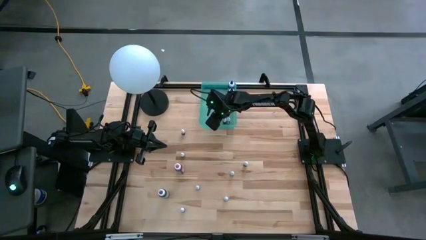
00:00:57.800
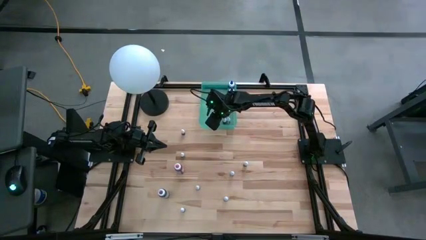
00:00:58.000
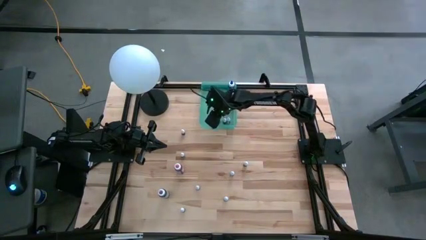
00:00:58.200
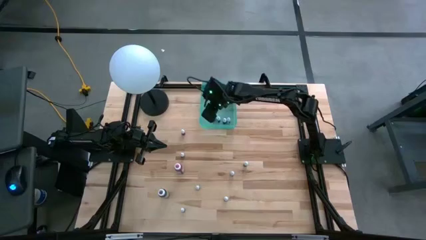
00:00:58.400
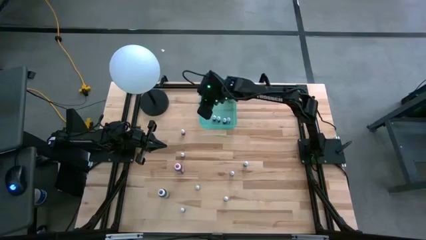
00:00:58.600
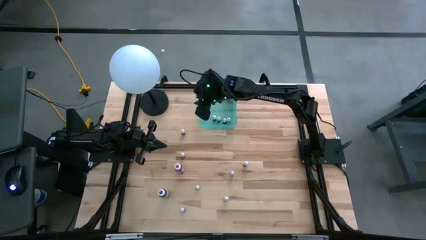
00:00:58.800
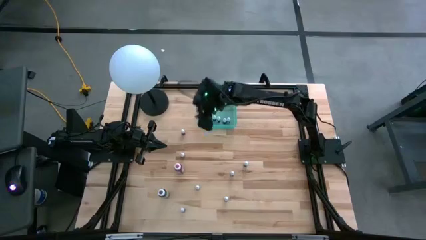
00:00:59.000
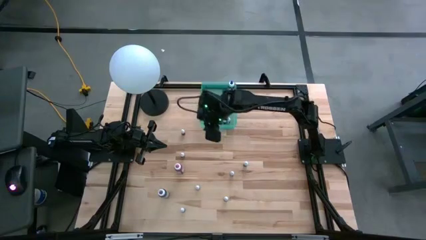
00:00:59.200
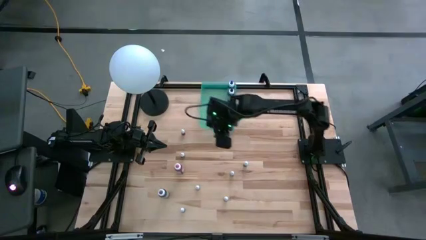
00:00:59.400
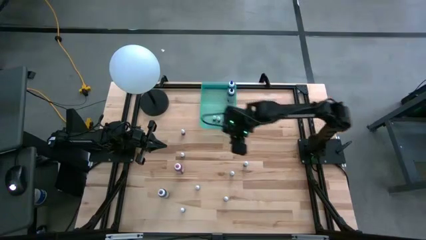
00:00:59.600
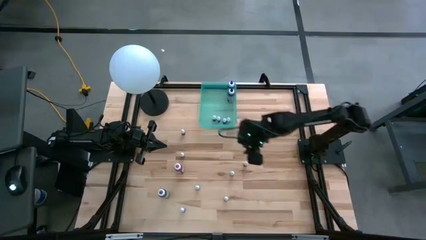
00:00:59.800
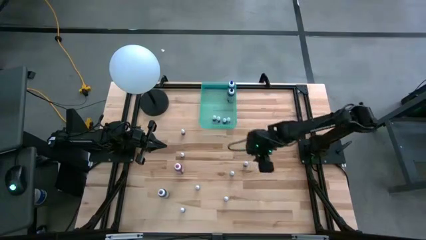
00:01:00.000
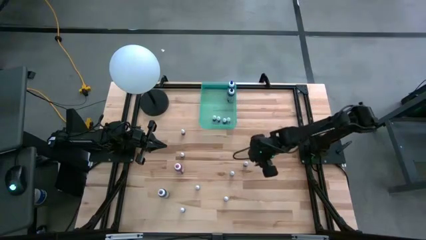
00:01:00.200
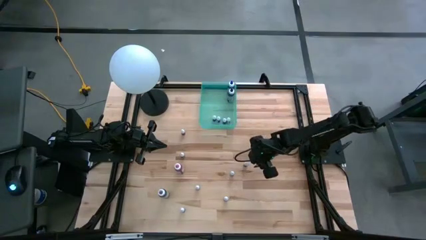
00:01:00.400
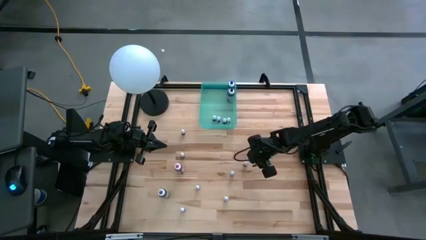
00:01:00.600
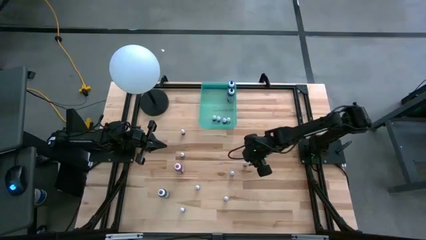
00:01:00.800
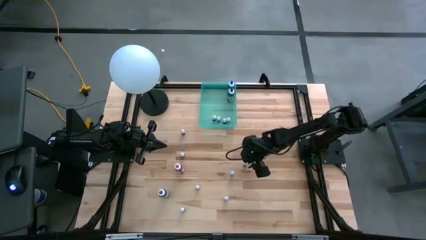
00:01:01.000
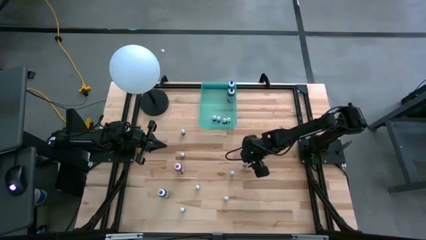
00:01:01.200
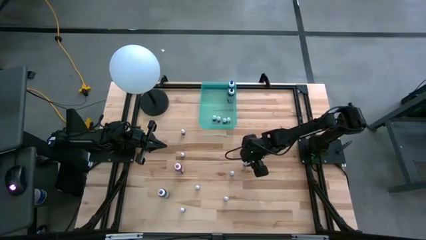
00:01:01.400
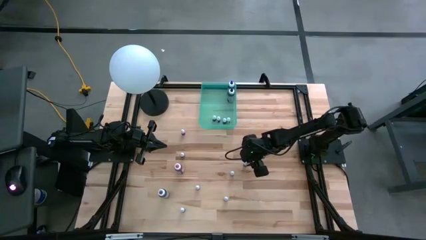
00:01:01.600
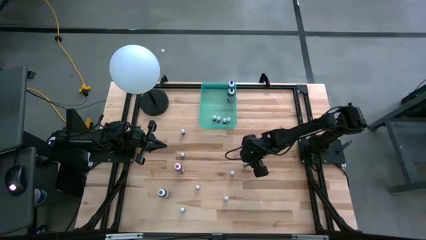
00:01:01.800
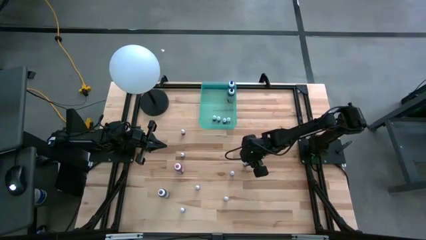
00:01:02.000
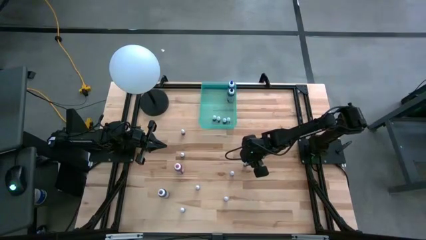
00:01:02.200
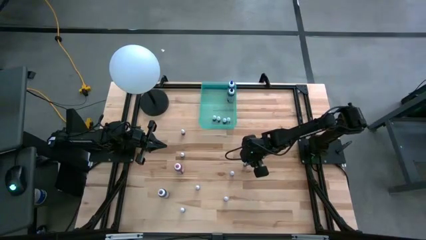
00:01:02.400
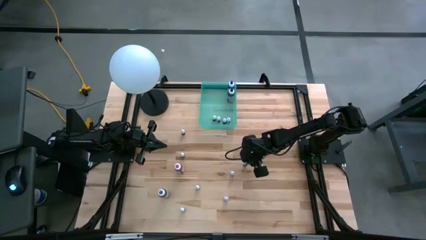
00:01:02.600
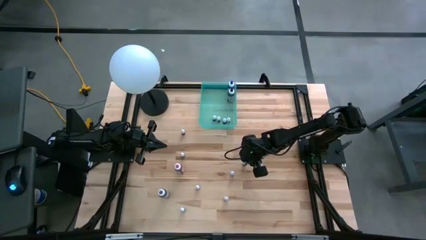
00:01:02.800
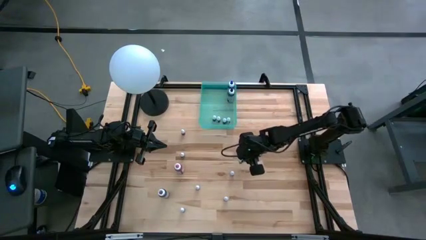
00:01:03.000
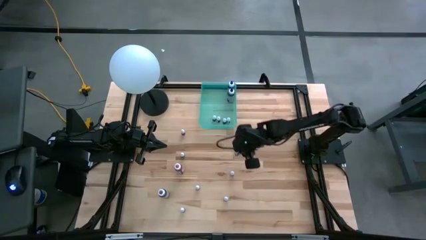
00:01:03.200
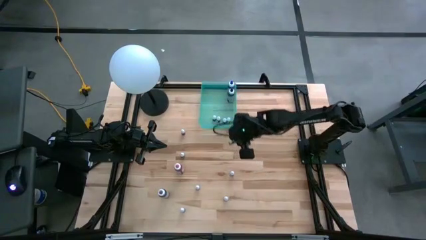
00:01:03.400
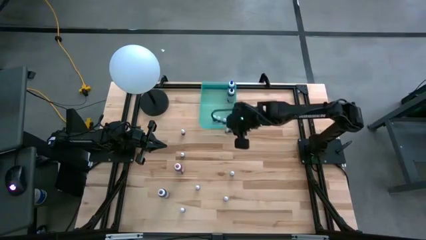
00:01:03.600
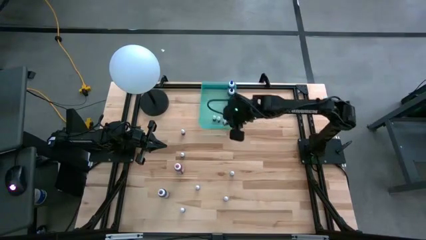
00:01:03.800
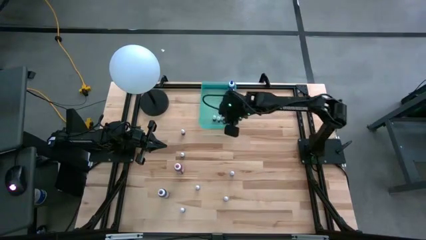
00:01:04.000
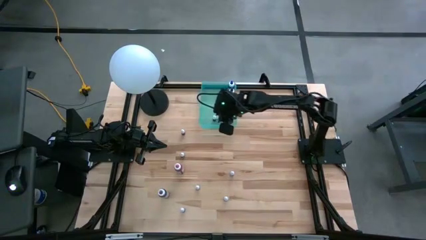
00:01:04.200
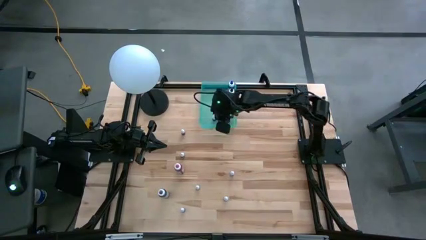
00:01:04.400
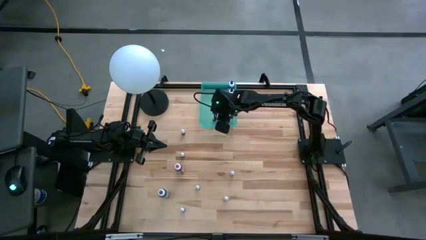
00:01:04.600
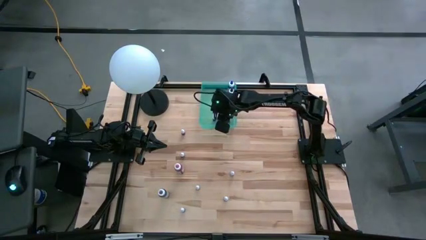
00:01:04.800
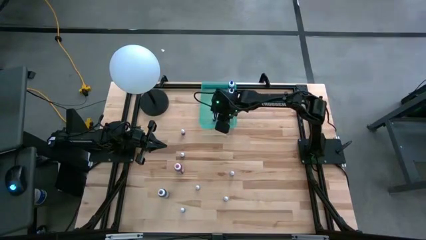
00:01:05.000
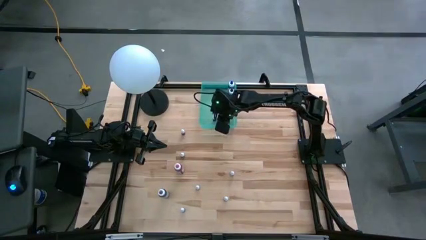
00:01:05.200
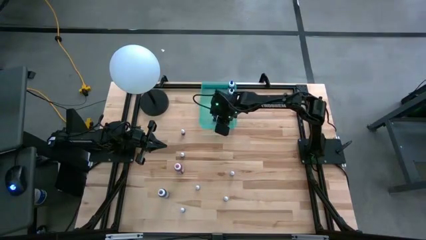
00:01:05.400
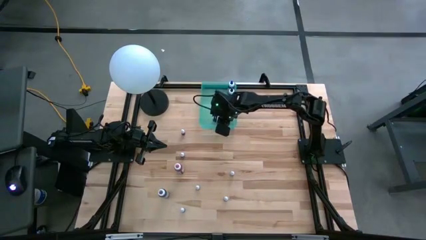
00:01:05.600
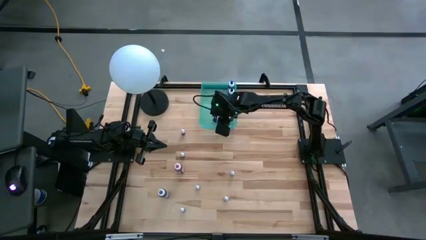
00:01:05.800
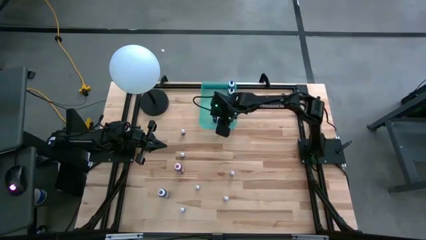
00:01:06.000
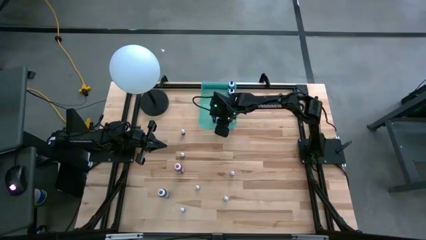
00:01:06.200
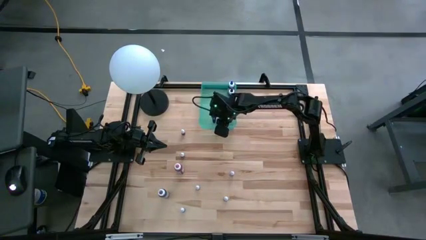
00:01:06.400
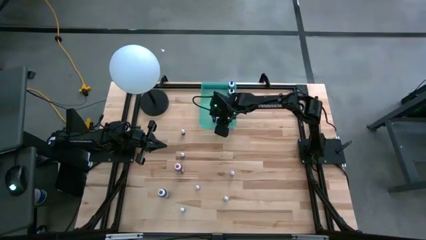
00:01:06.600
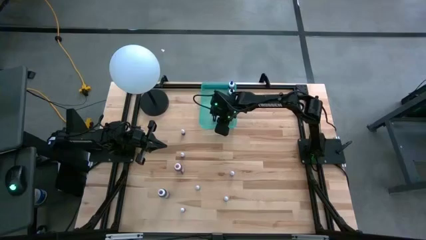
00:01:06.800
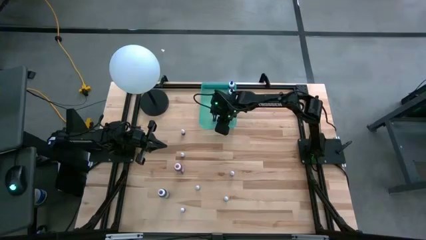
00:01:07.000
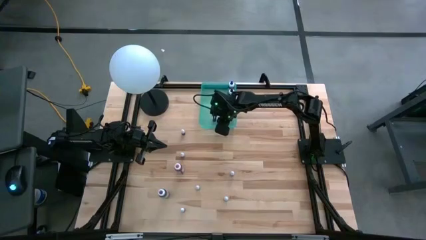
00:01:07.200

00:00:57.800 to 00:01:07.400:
Task: Pick & Place food coloring
Put the green food coloring bottle into the light blue bin

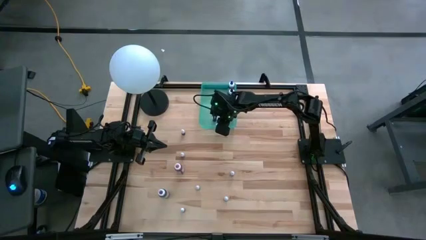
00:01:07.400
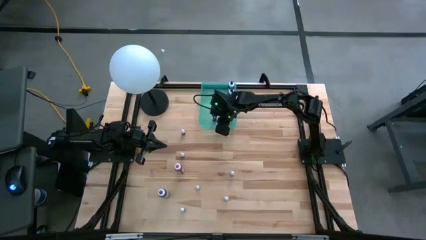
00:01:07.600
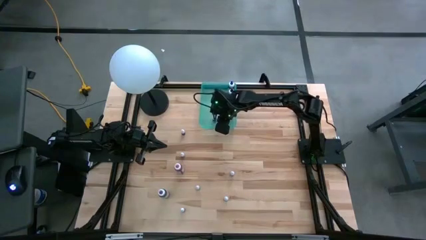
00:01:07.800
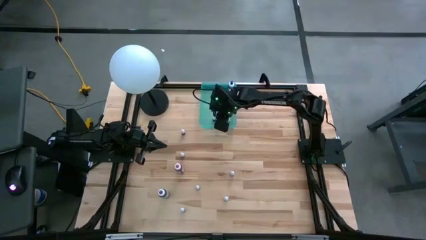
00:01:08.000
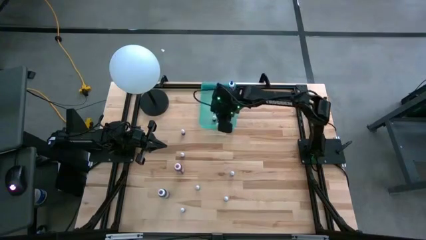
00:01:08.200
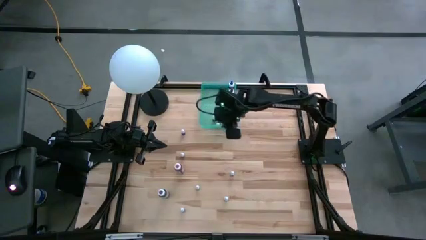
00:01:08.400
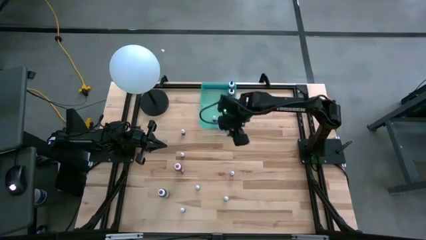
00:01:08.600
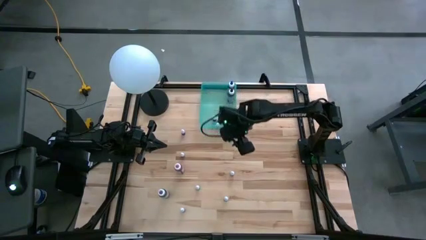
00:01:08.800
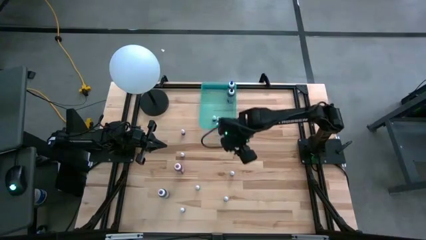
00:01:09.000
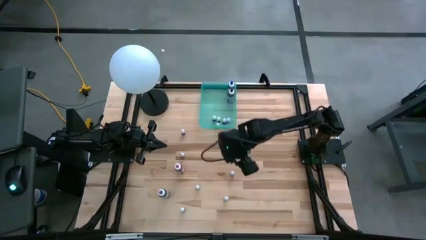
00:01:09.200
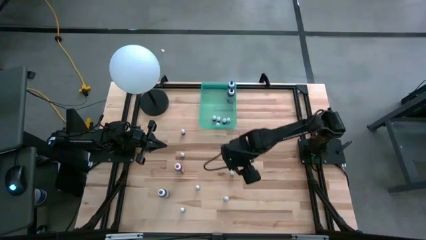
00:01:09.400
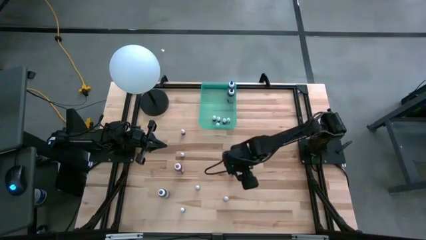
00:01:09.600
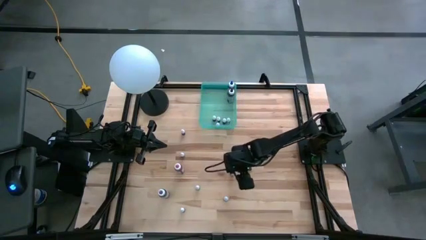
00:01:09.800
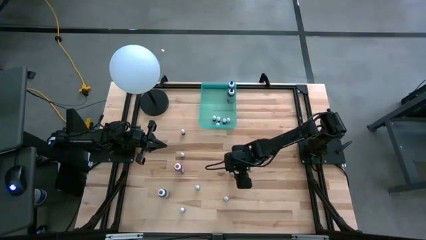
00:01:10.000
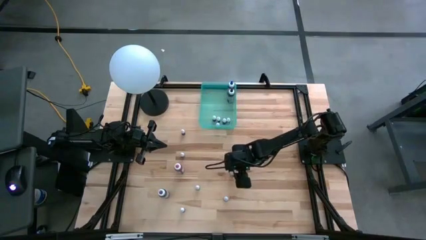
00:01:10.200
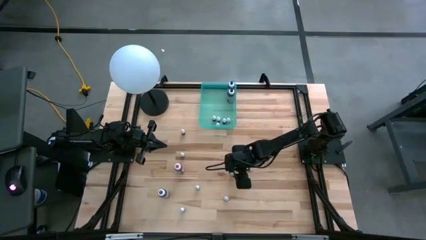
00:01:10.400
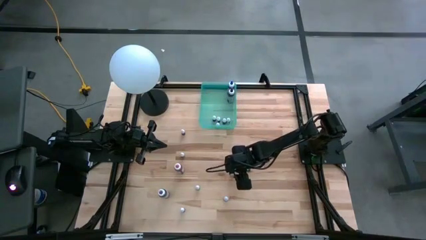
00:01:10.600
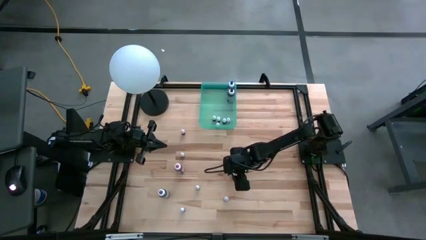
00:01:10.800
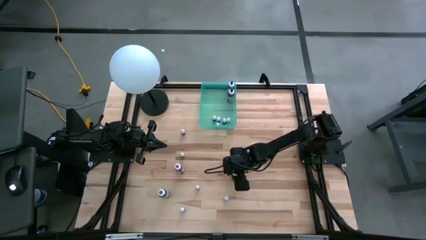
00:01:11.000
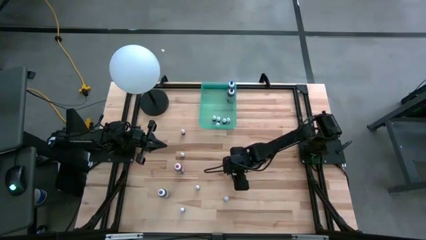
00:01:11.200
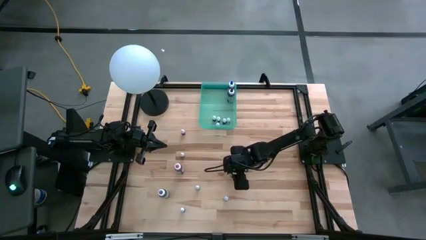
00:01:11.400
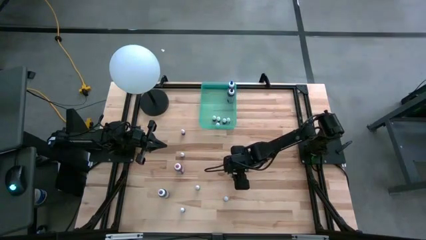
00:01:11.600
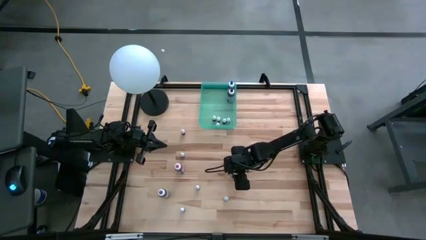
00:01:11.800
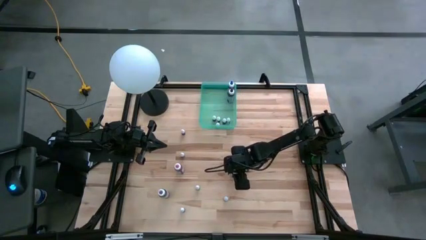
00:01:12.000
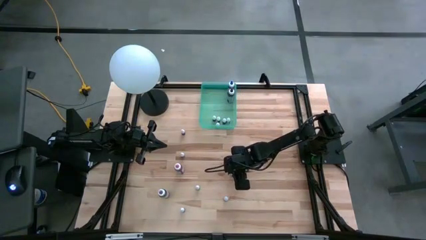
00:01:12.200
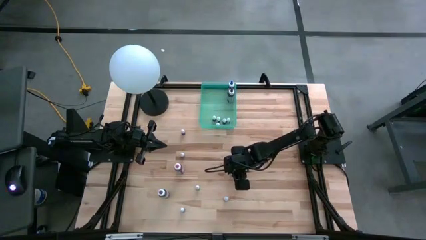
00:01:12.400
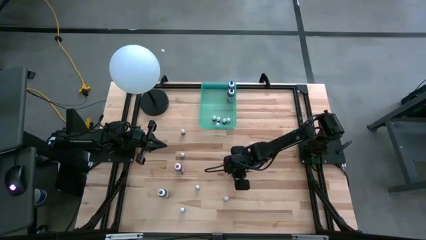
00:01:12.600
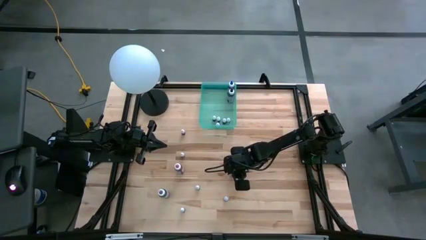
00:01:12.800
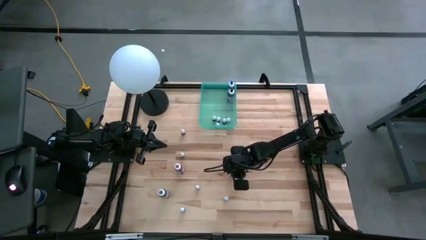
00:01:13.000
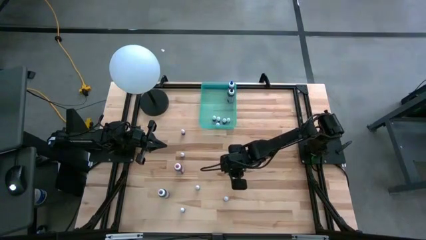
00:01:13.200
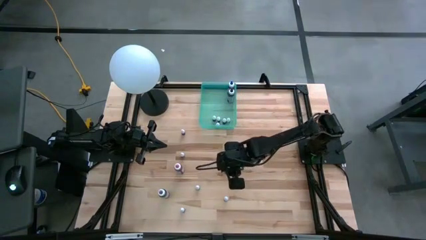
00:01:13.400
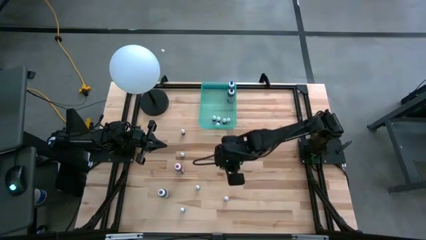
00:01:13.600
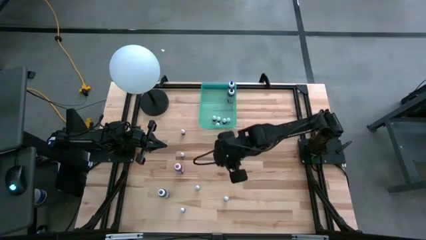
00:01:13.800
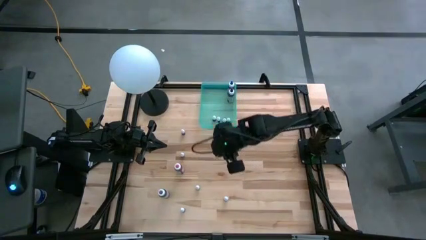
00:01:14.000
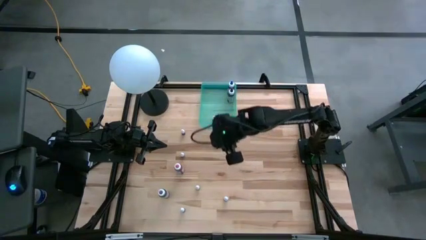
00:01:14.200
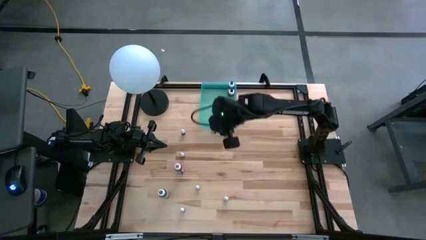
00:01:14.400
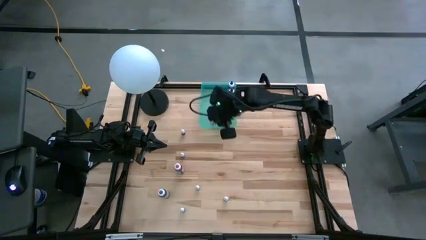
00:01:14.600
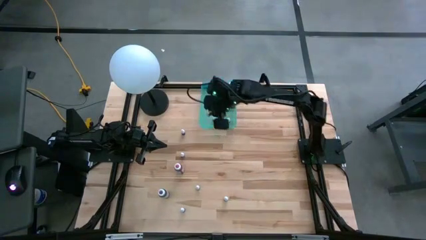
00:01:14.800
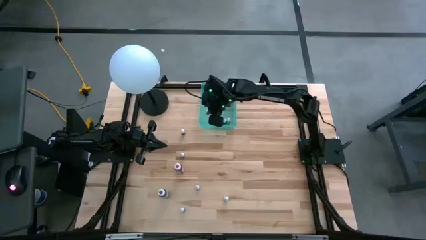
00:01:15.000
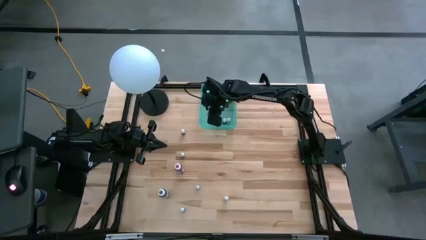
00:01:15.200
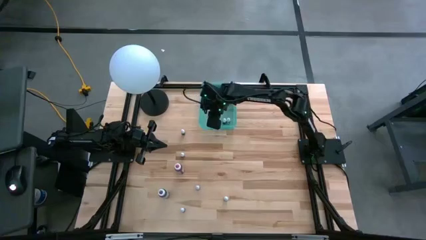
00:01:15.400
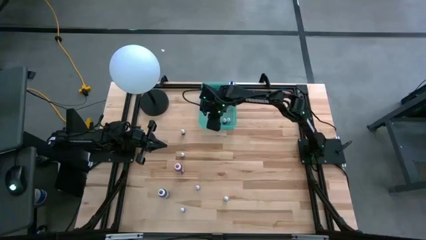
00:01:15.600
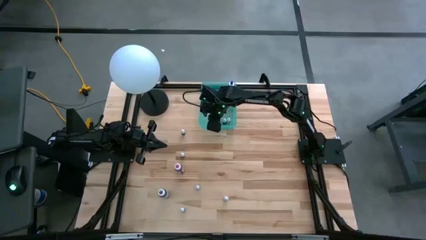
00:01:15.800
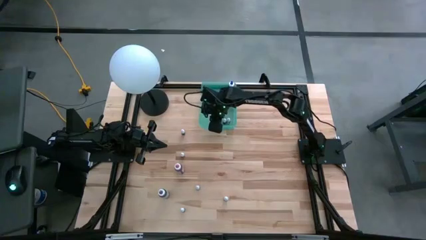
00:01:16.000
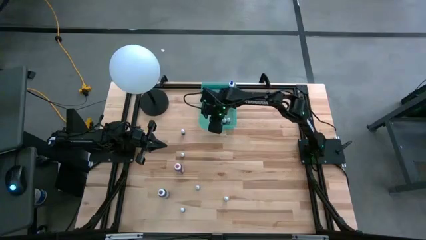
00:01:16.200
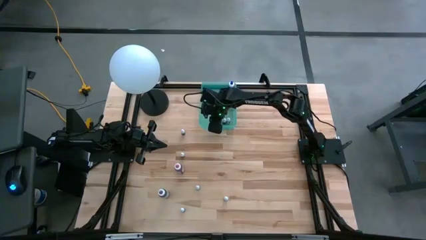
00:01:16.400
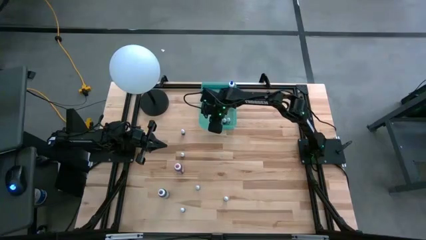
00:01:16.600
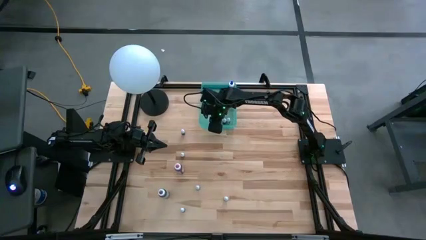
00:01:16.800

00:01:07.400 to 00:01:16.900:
Put the small purple food coloring bottle into the light blue bin
